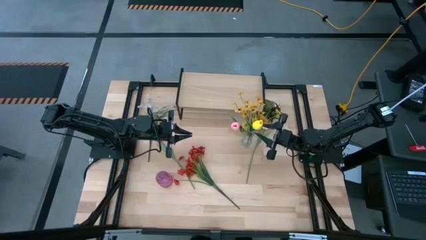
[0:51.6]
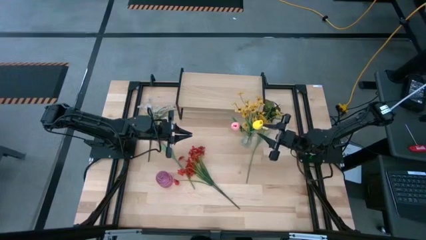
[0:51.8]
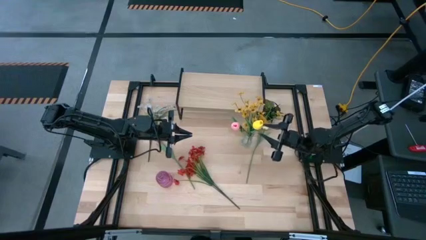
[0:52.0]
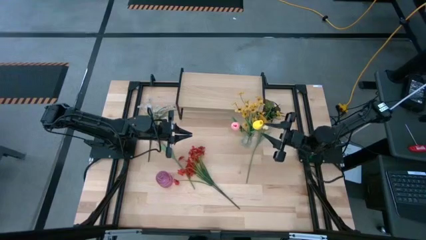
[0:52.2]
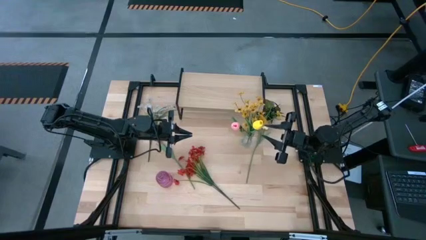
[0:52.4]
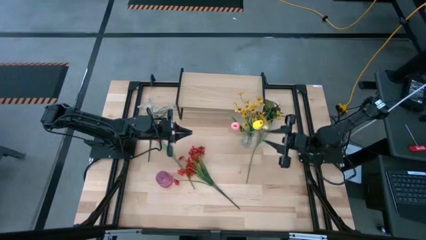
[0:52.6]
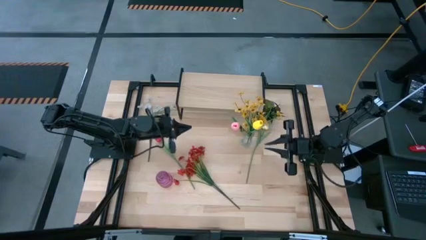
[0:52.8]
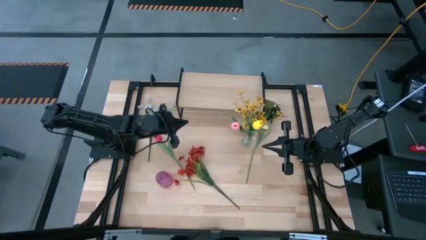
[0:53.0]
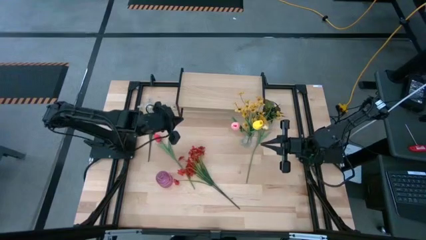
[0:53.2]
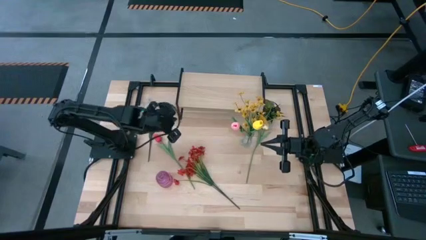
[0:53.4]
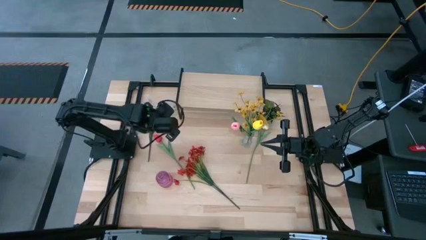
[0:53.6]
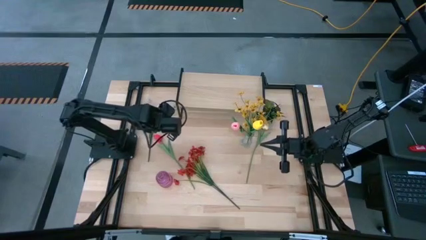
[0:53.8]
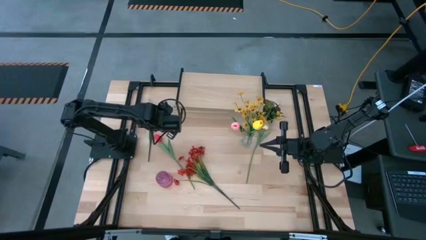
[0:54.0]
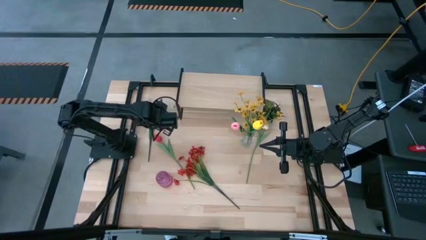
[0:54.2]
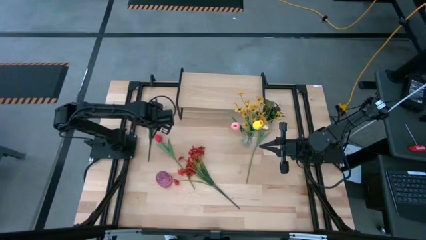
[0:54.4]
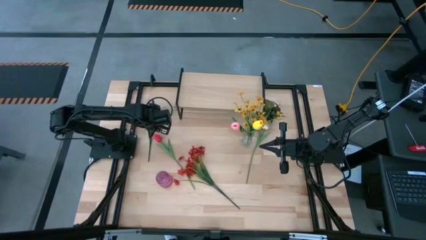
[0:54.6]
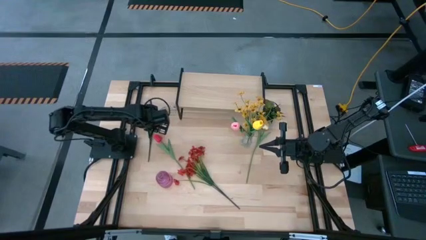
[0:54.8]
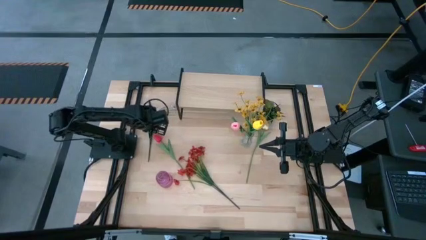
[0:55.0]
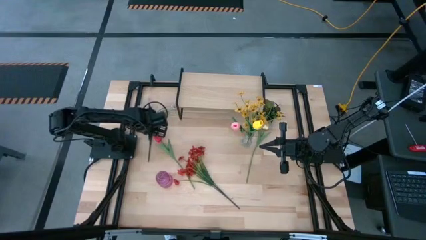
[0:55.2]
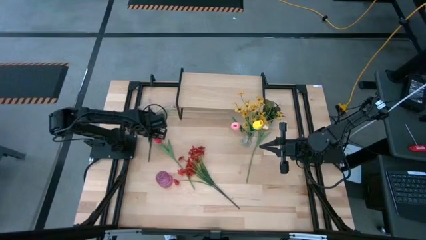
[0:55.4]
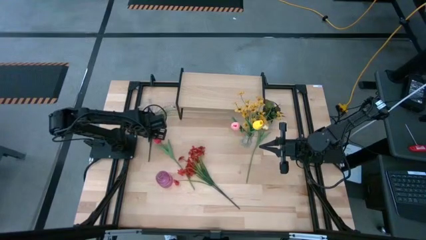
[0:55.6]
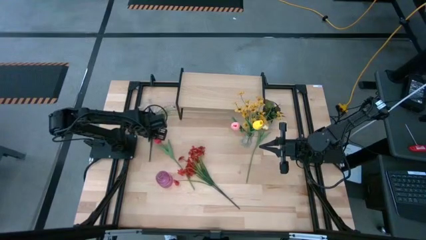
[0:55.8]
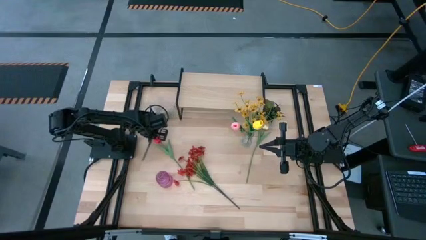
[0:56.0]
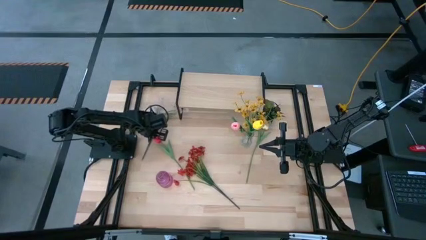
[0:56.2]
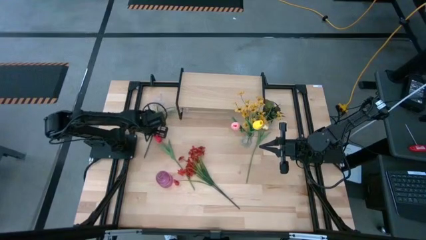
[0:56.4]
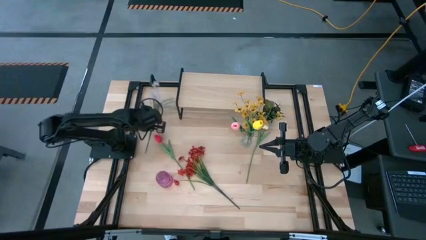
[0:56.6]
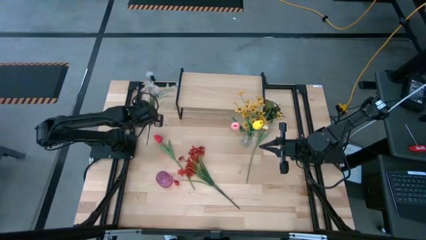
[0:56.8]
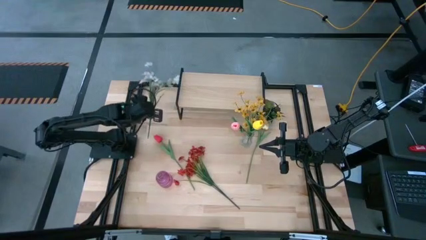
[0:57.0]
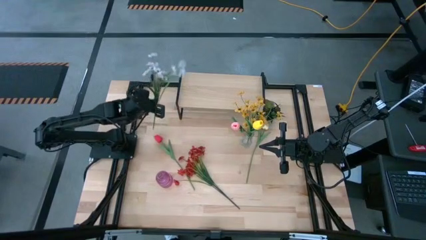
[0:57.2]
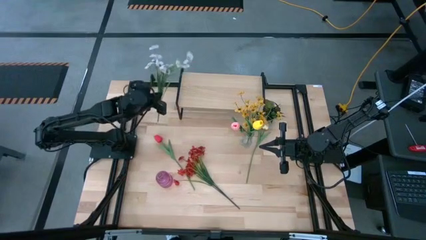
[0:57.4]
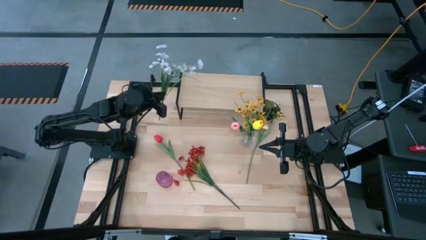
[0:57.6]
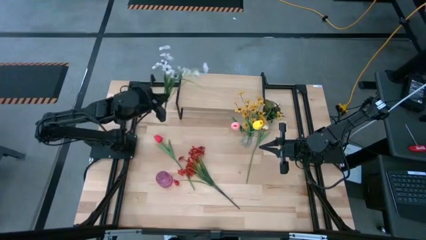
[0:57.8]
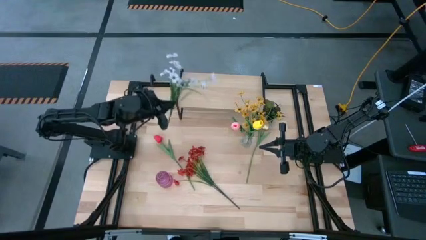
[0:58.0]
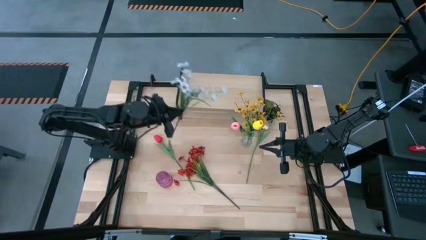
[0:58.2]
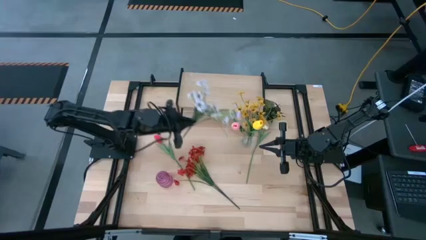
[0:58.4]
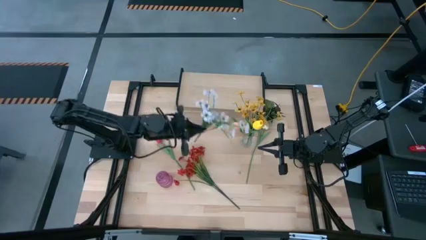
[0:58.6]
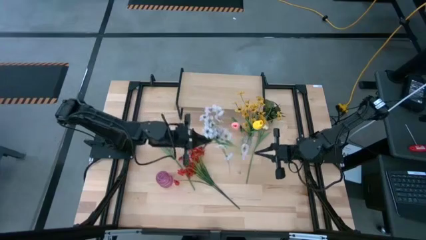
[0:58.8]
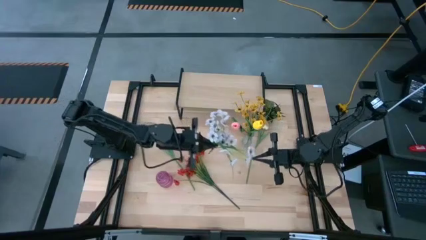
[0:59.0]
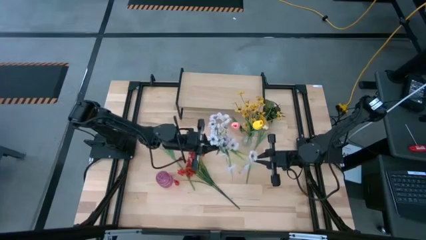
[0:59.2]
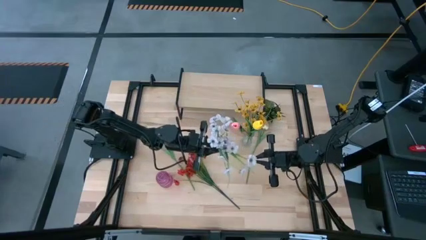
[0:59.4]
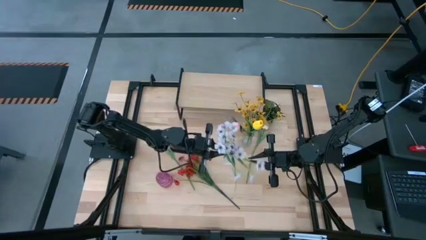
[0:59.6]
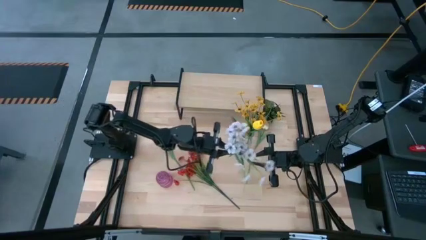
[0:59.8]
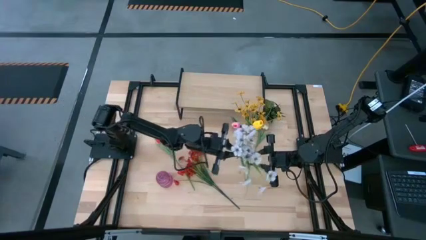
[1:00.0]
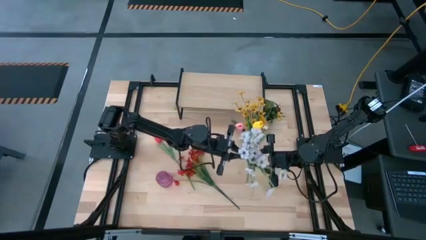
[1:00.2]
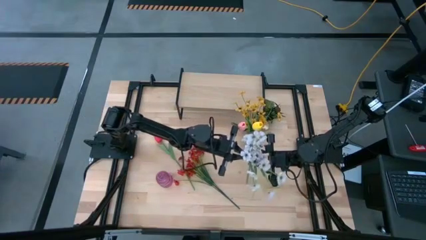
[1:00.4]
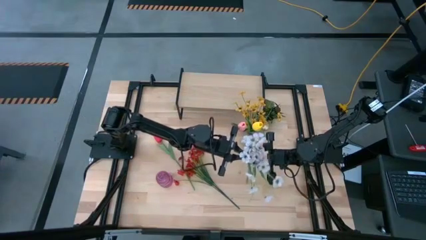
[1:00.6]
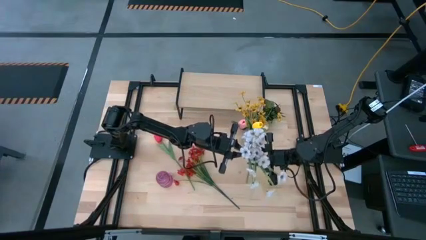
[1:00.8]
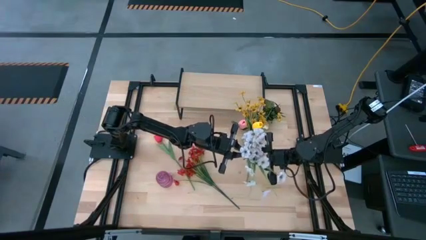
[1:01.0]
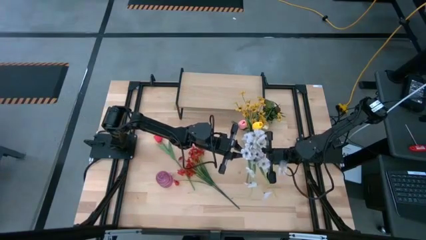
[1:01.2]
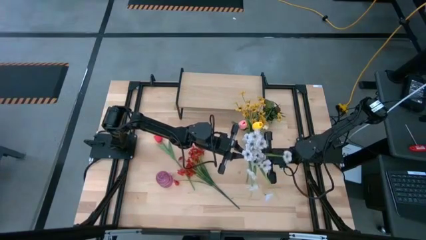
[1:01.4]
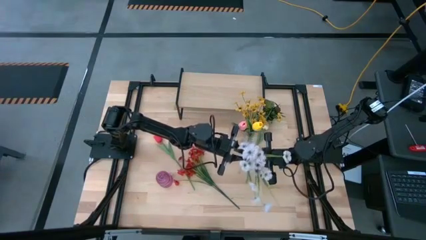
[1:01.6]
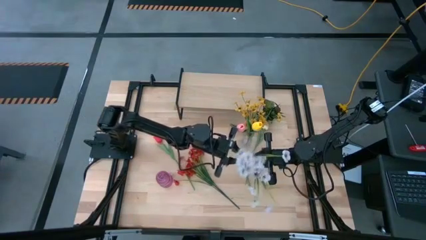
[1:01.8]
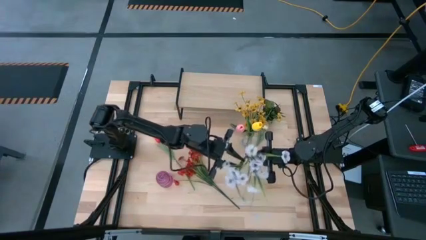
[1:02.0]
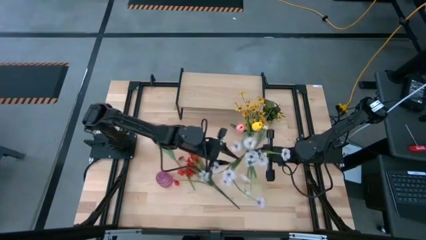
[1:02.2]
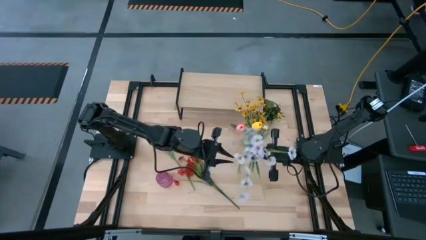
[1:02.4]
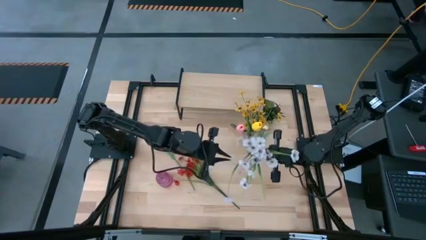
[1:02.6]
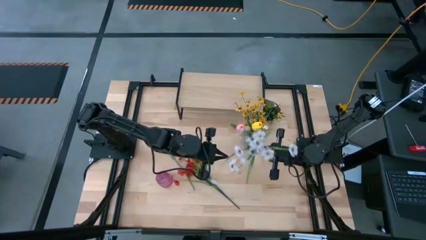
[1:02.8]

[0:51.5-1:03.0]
Task: Pick and place flowers into a vace then onto a shelf
Put the white flowers into the transparent vase

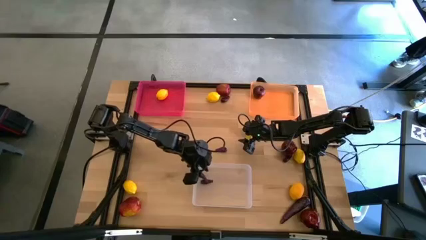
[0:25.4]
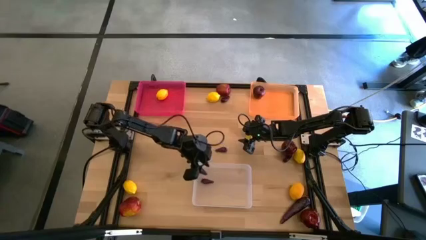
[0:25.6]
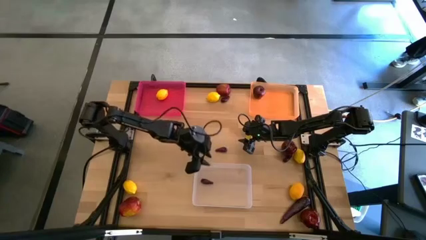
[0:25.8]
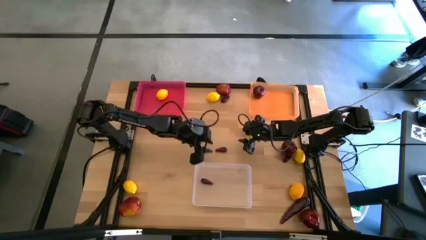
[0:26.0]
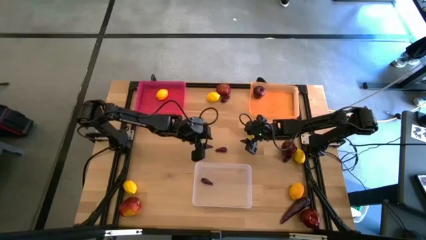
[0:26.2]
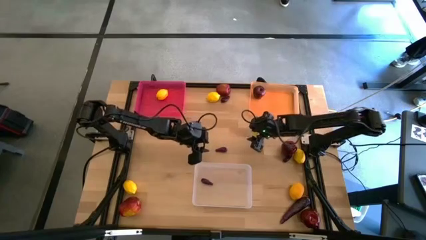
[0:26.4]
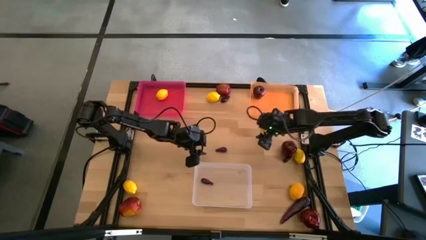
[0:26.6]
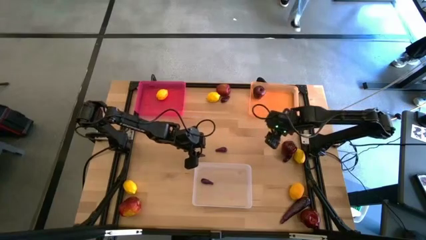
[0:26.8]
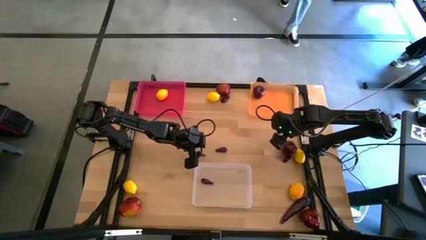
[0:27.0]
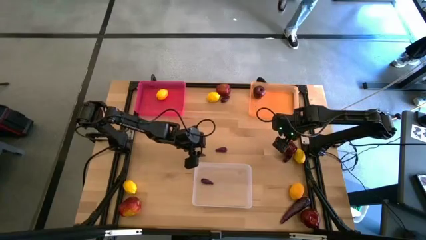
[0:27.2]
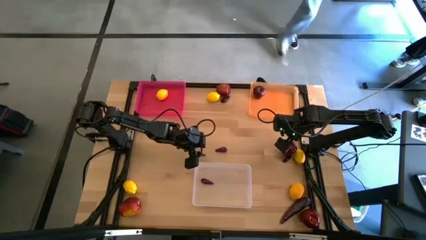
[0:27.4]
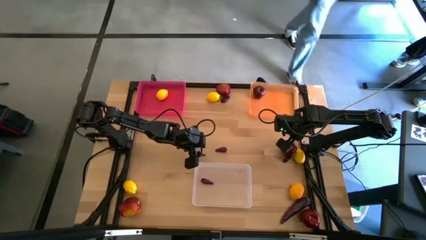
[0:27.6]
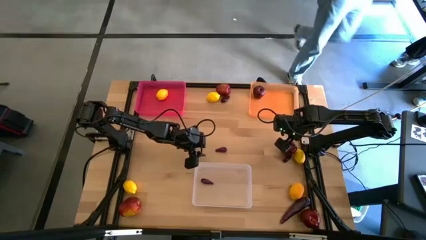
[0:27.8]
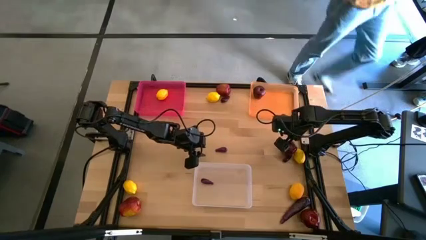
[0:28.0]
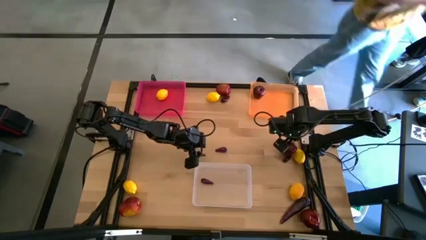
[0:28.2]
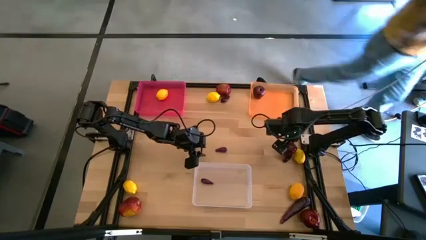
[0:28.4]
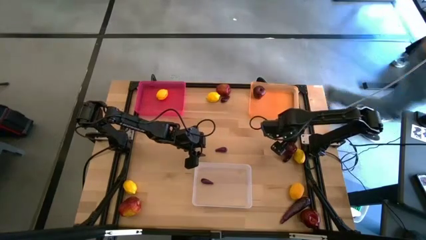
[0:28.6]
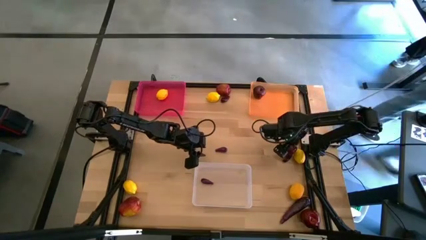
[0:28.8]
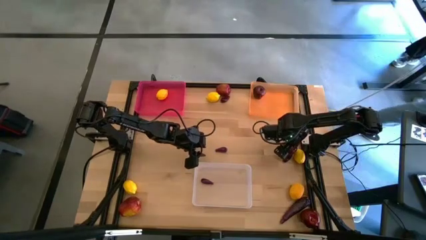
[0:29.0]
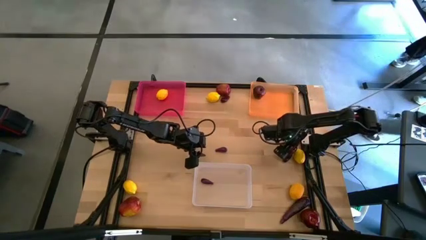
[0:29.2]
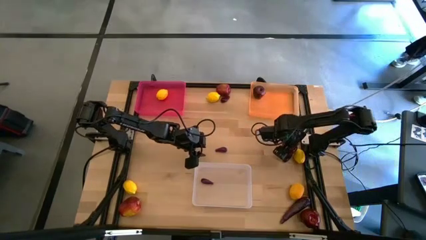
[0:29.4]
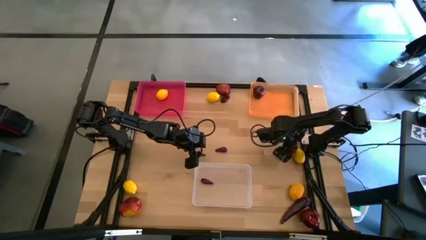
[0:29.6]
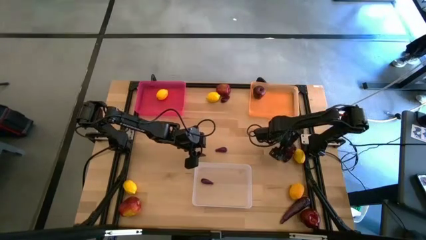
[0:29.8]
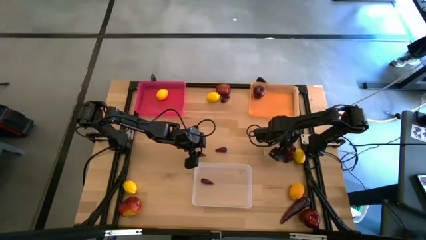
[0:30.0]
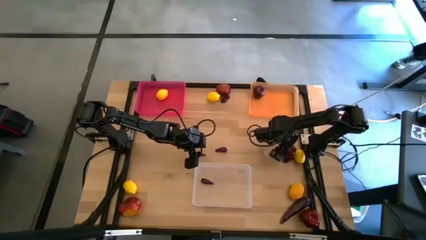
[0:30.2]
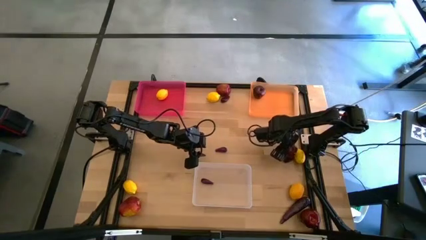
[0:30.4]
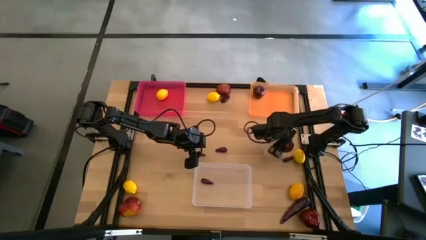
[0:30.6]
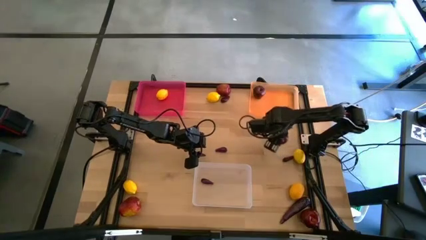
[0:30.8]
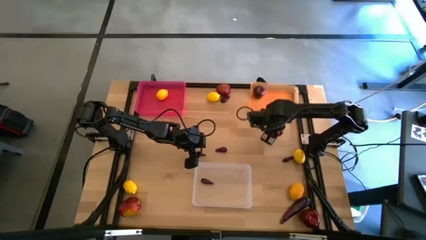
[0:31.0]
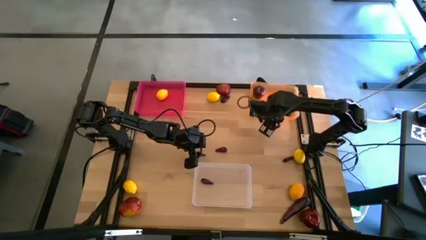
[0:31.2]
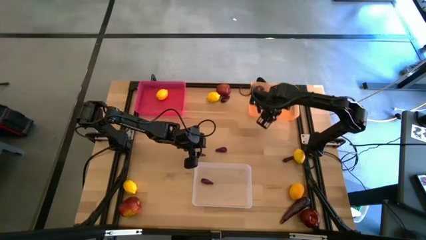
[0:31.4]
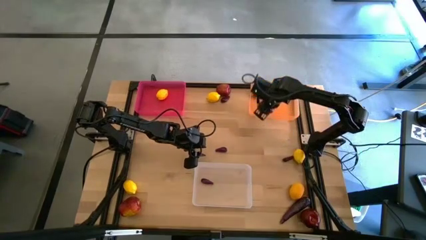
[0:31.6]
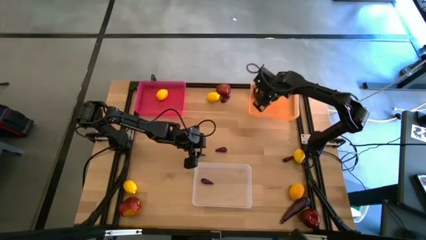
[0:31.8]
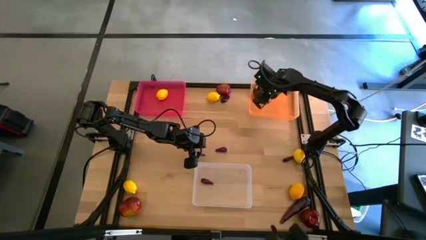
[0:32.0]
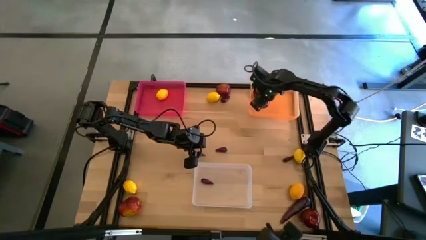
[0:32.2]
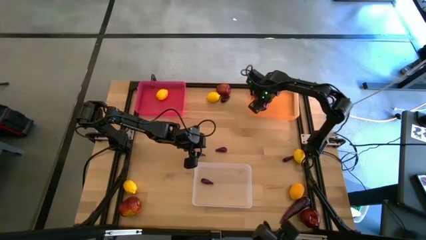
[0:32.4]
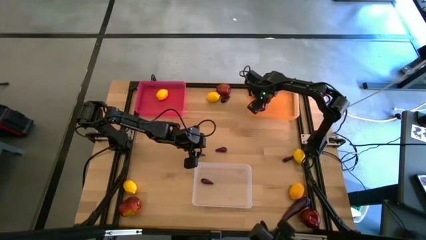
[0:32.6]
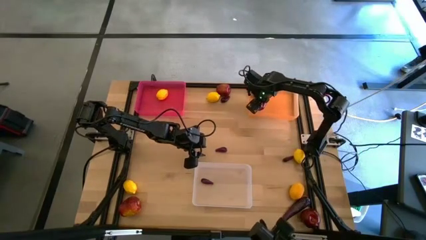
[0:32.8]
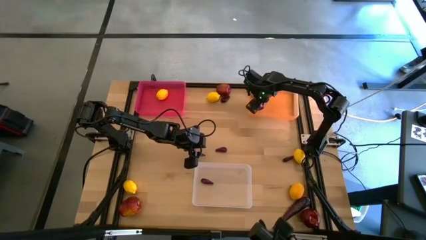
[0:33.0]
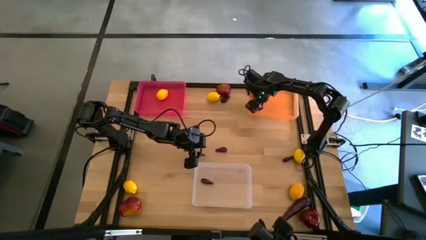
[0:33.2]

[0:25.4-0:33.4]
Task: Sort produce into baskets
Put the apple into the orange bin
